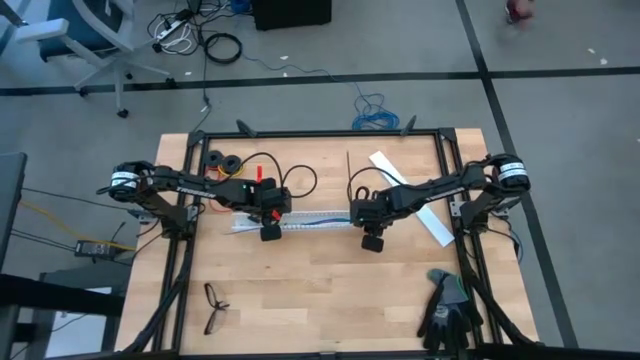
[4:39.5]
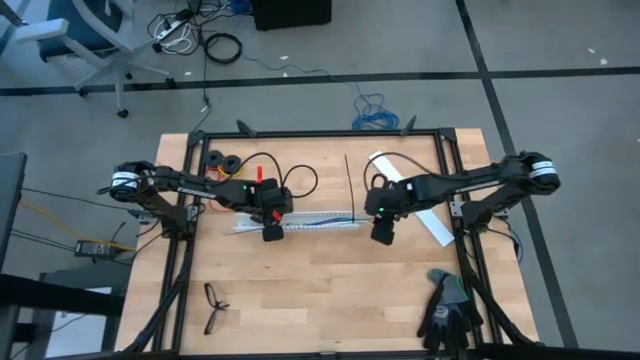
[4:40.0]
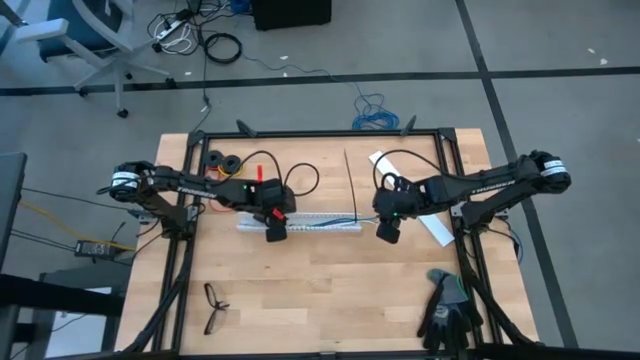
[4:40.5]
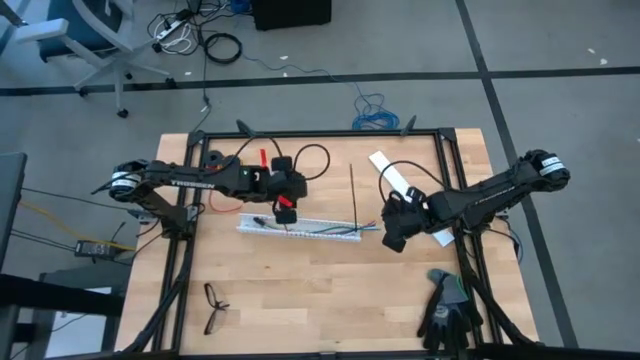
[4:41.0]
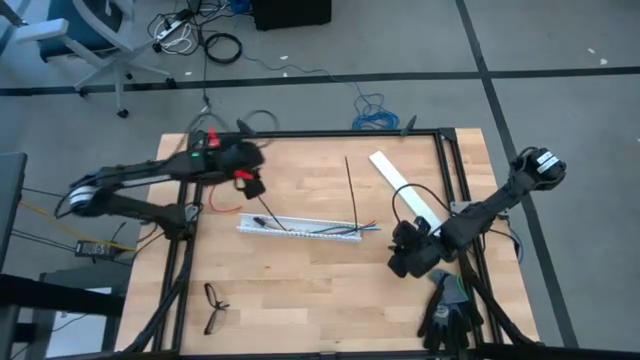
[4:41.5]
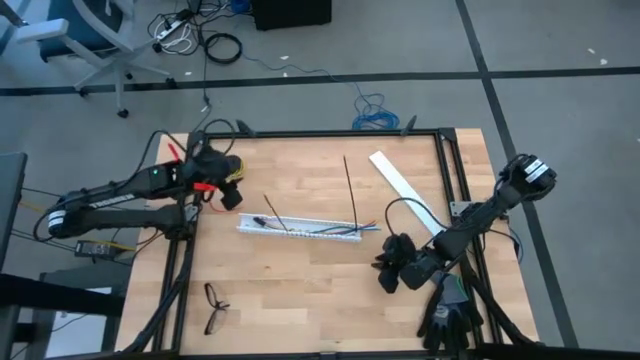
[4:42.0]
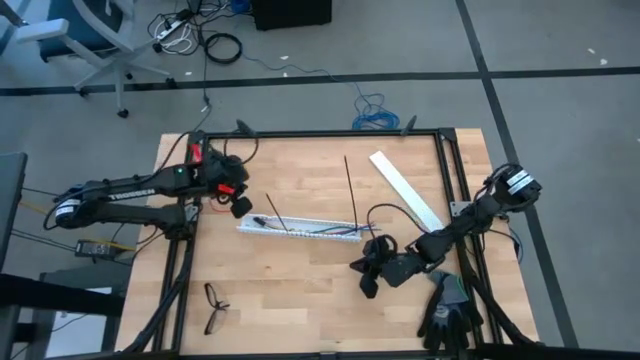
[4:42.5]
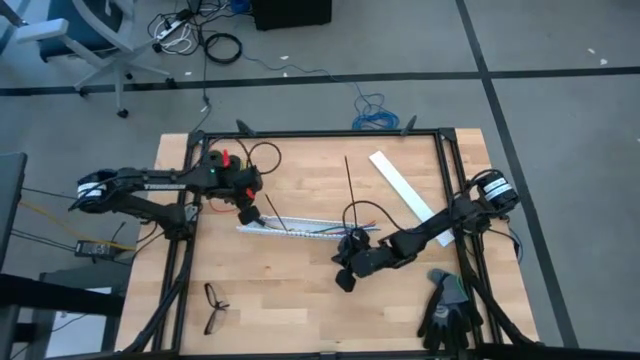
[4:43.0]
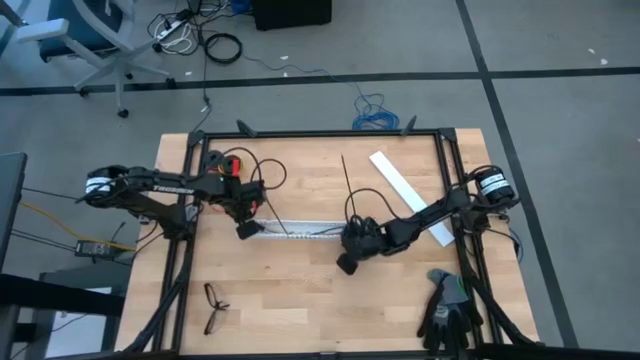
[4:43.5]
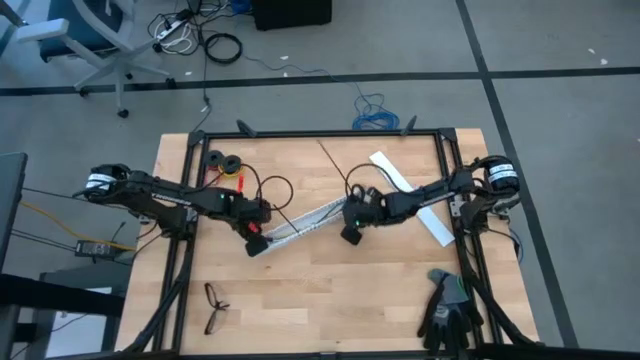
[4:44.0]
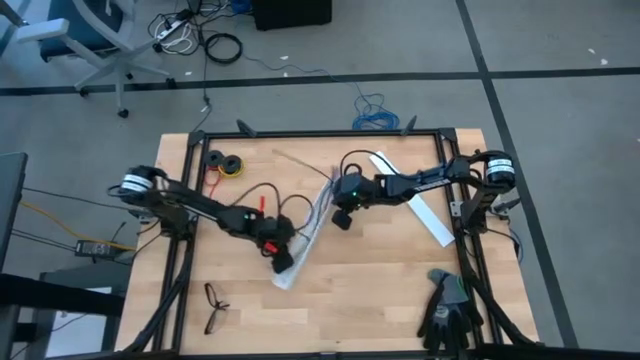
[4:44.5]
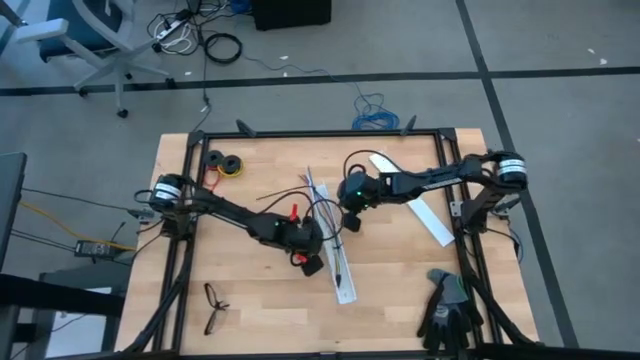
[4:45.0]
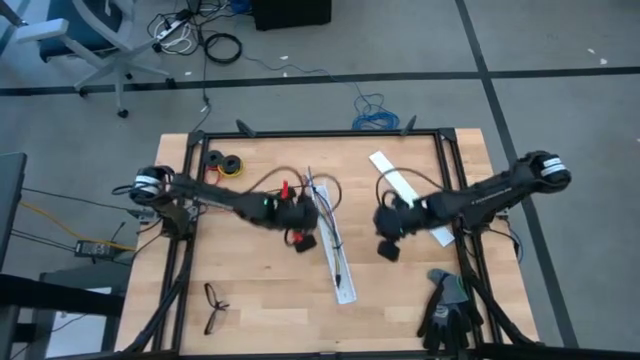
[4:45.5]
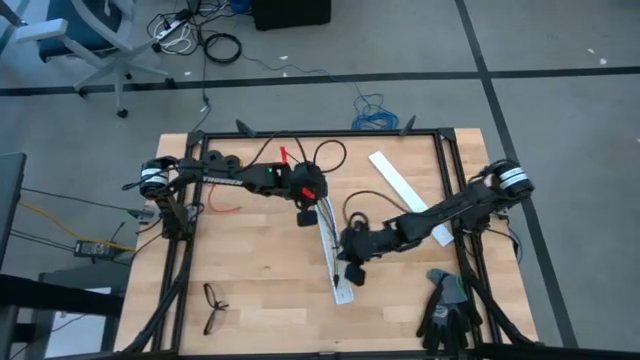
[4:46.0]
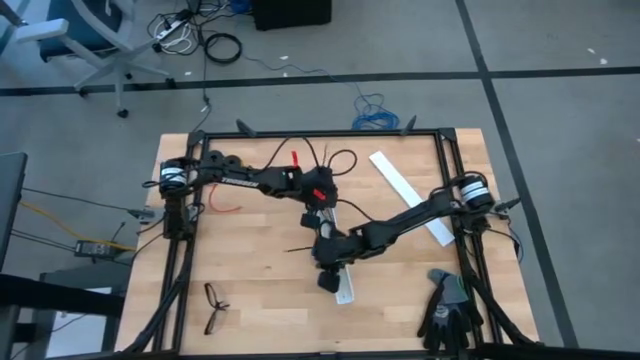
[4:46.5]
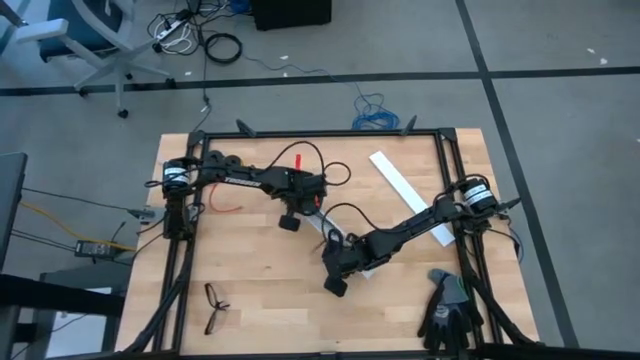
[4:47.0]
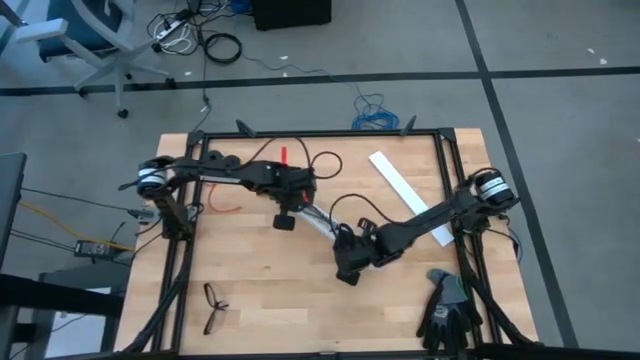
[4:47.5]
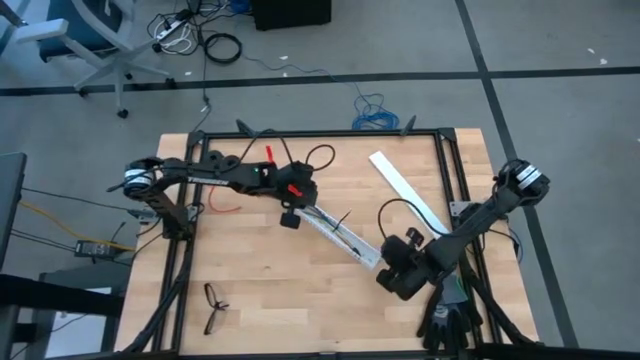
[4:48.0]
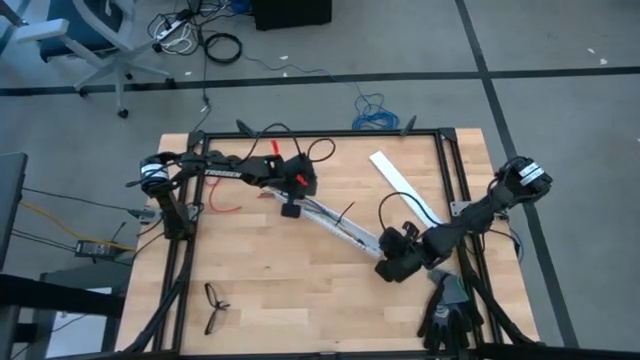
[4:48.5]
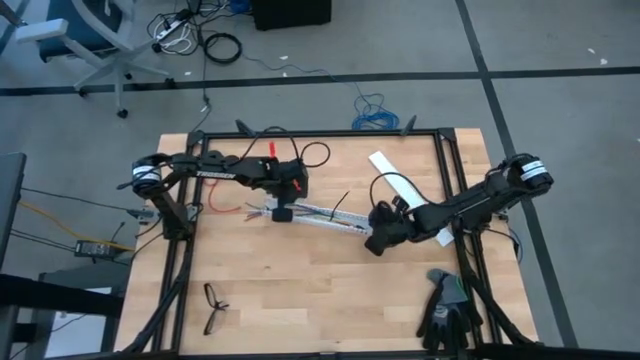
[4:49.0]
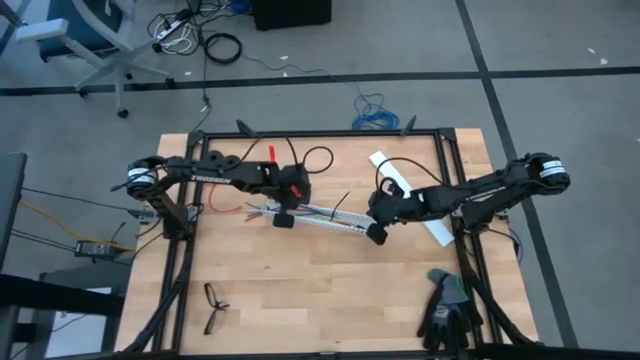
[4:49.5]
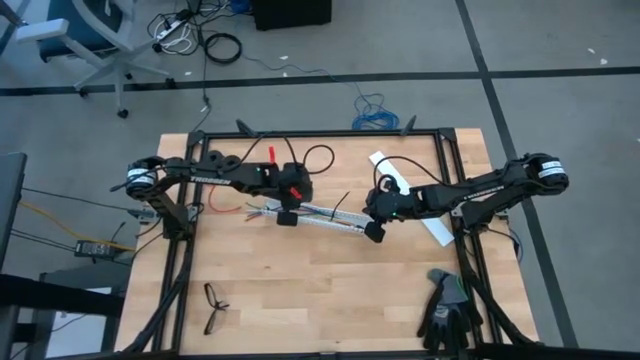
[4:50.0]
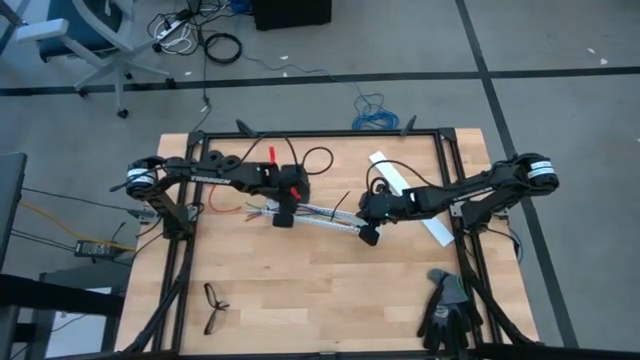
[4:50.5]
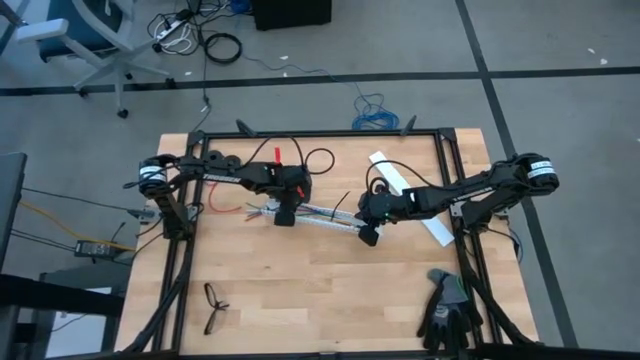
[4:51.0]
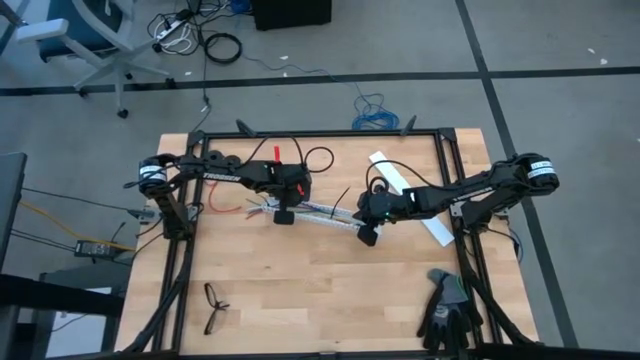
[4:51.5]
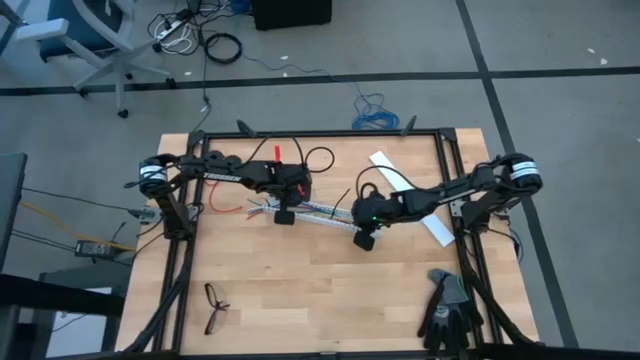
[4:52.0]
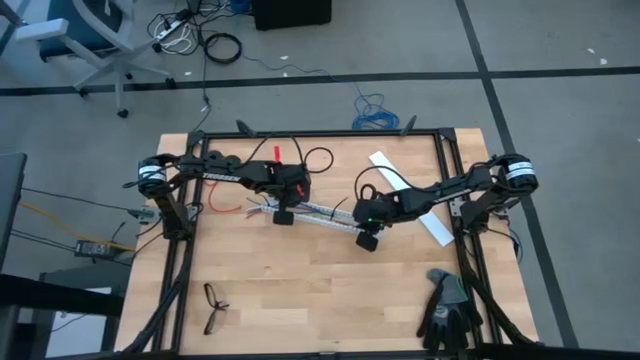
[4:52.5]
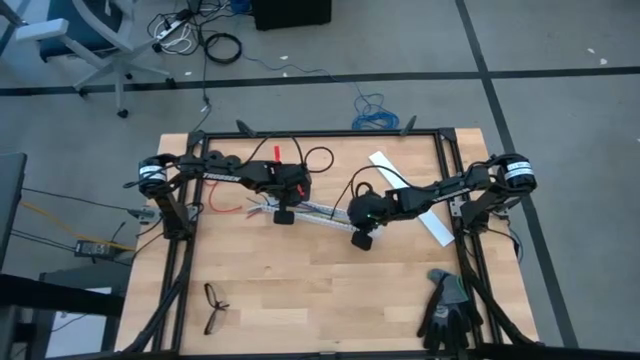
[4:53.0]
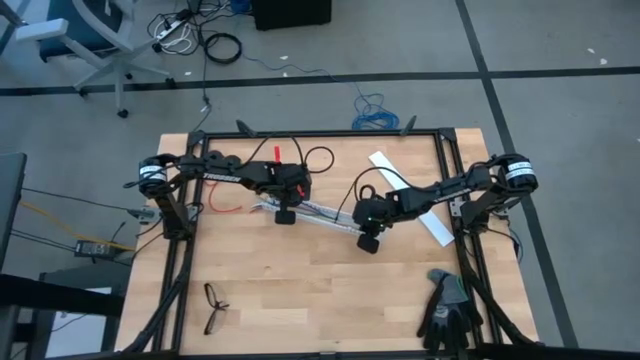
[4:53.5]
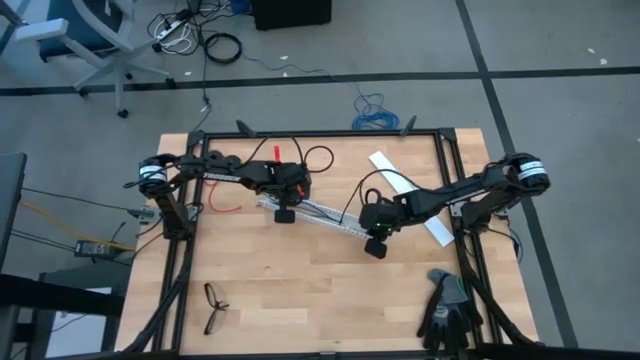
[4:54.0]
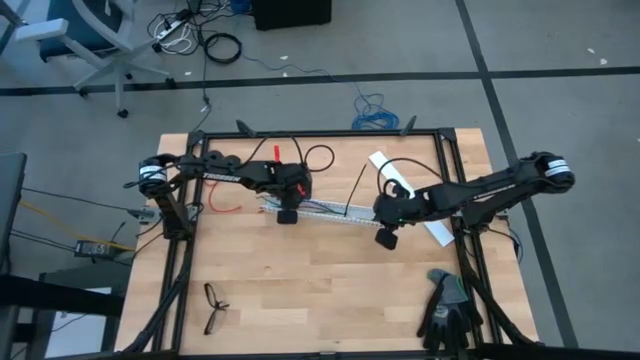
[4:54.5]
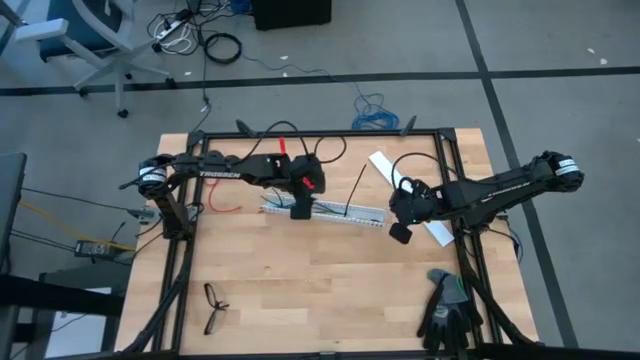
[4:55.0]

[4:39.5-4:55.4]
Task: Ziptie cables
Prepare the white cable duct

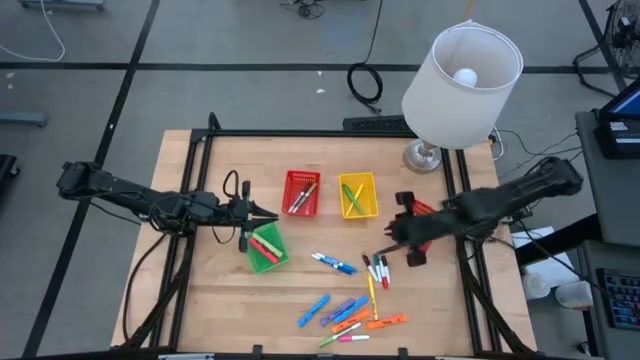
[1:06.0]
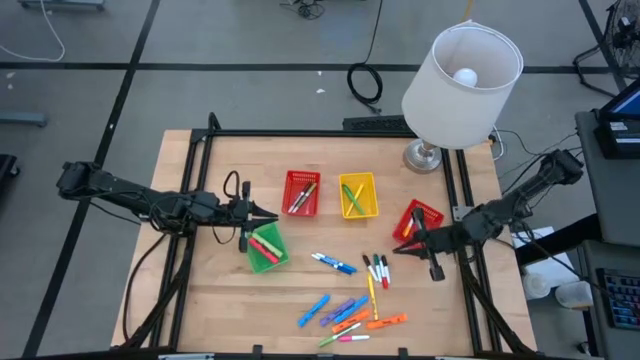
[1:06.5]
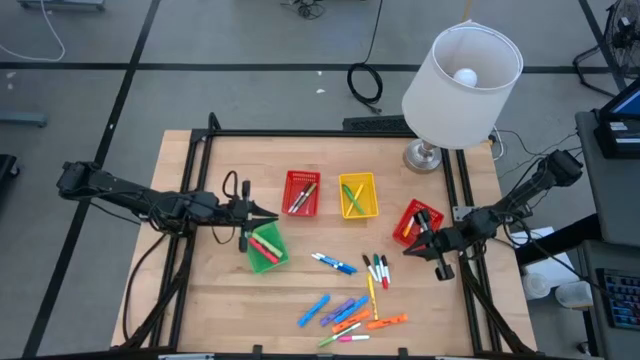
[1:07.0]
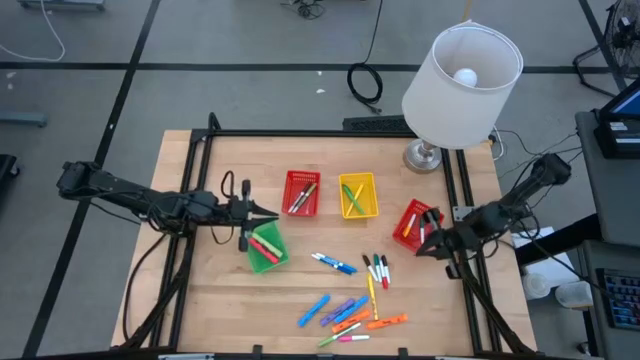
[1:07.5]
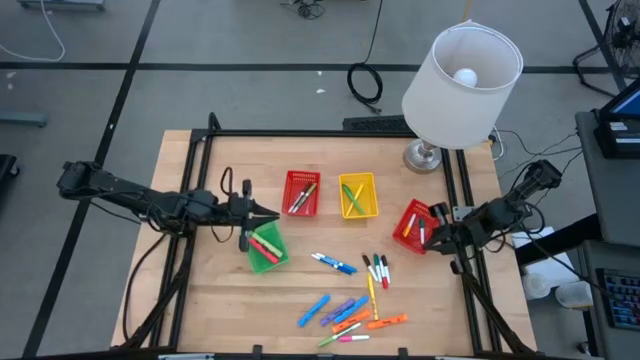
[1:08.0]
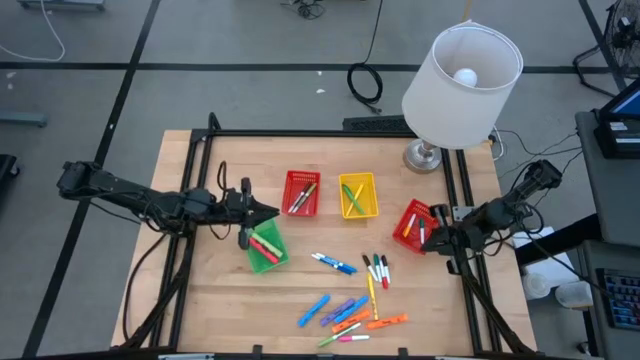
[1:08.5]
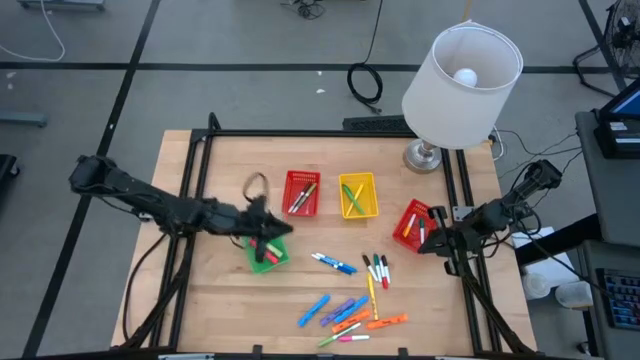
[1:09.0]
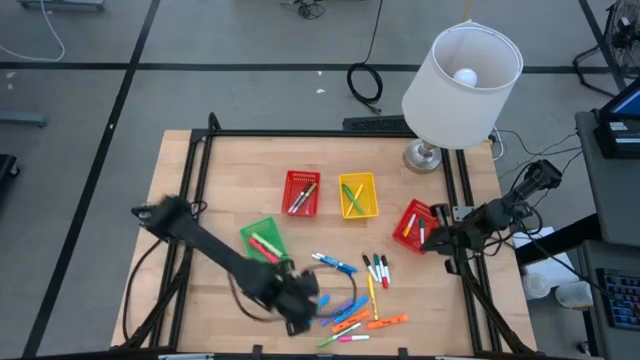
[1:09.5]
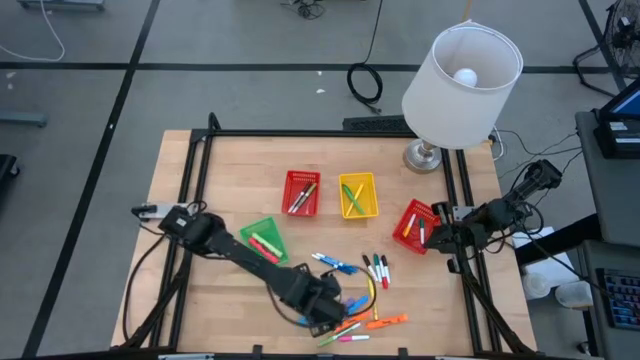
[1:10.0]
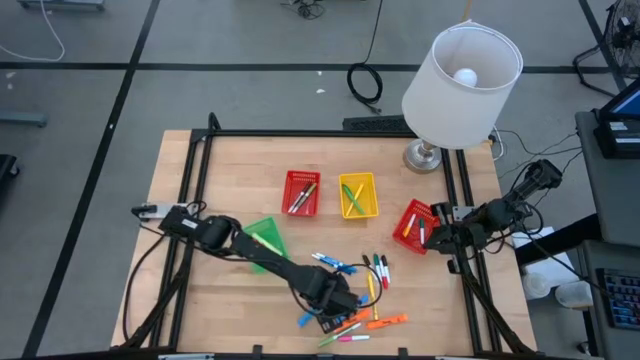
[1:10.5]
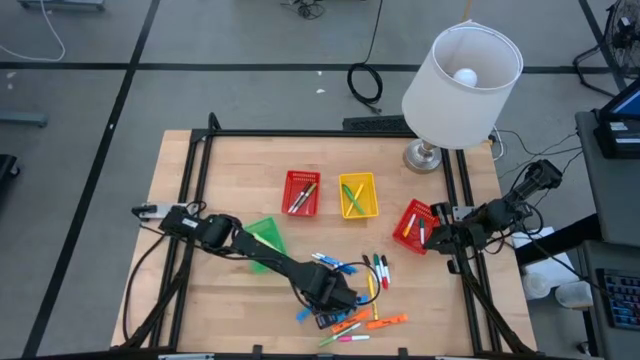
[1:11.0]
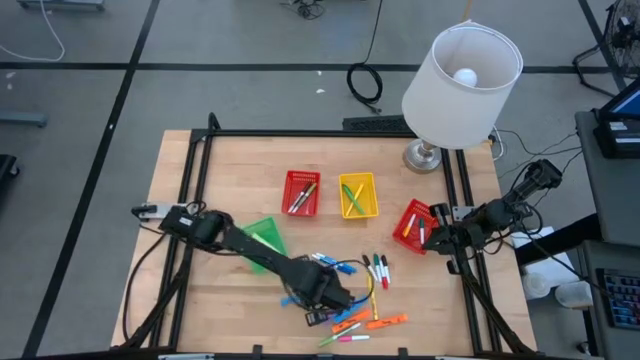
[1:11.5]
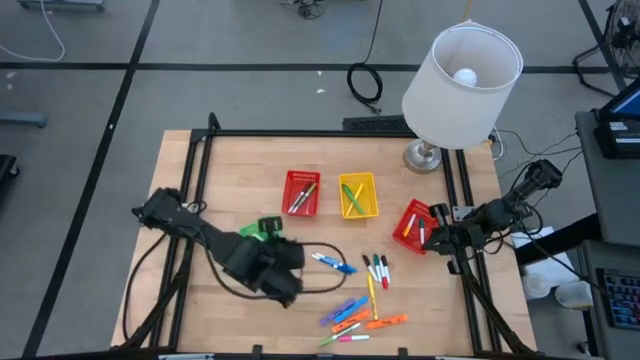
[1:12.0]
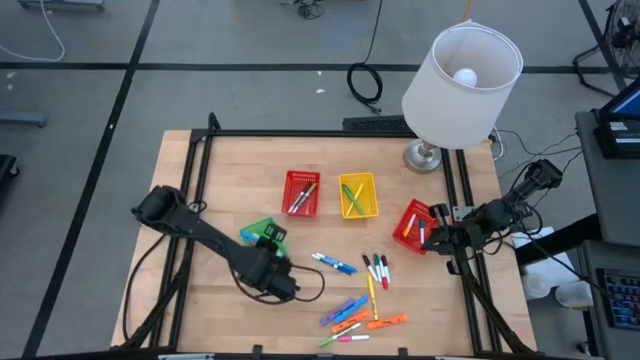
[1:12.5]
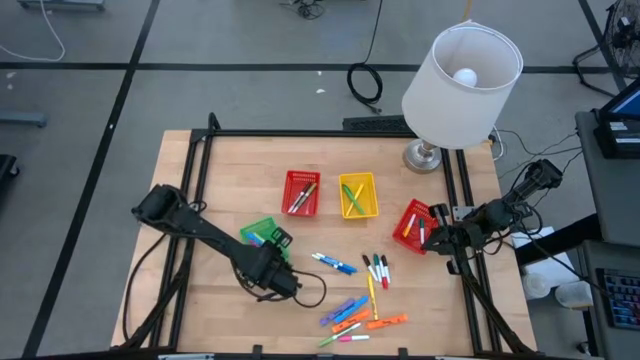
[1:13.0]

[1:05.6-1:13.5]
Task: Pick & Place Markers
Put the left light blue highlighter into the green bin
